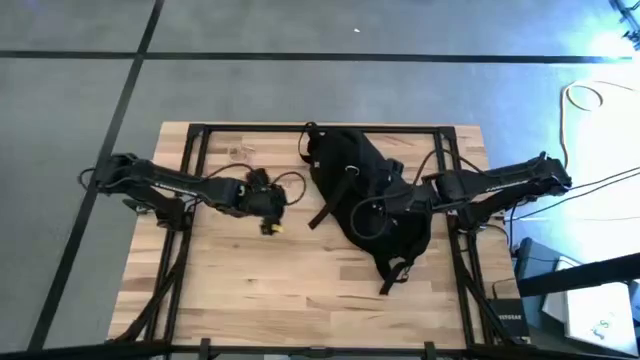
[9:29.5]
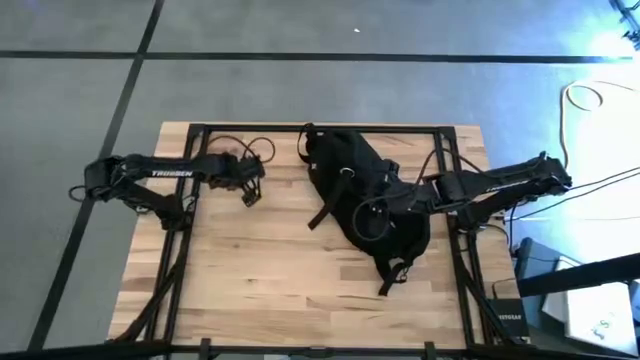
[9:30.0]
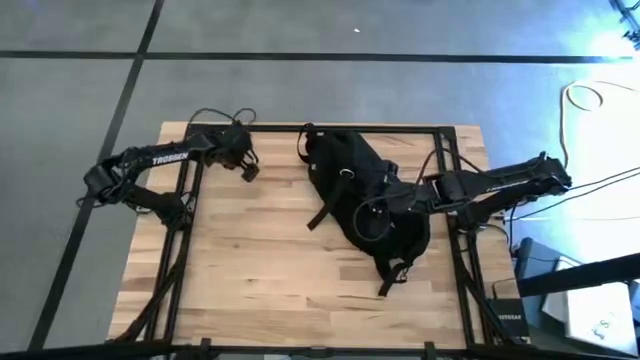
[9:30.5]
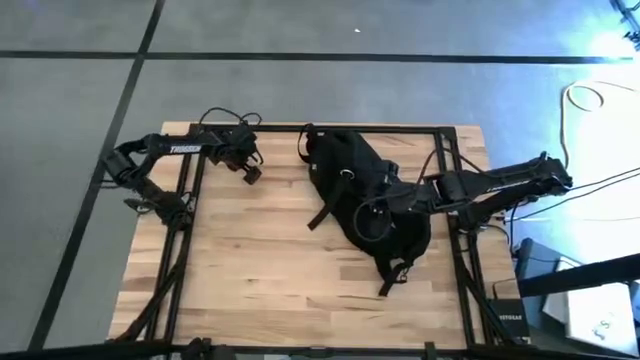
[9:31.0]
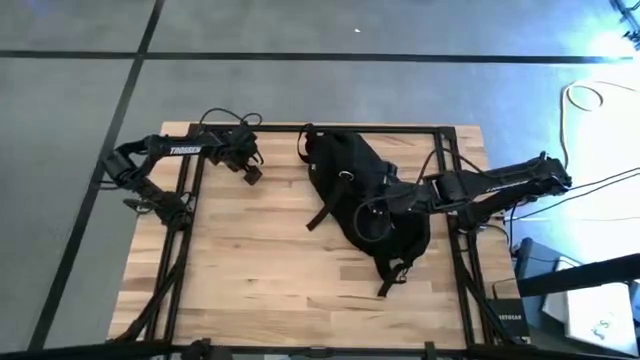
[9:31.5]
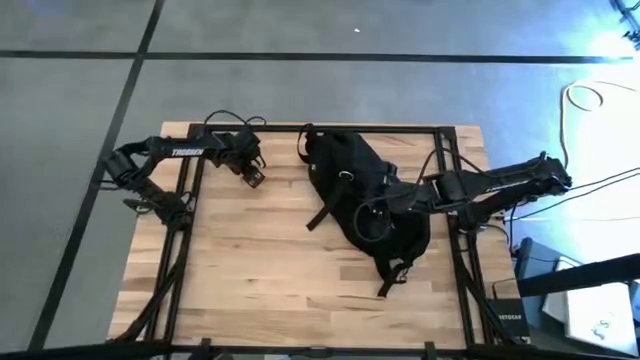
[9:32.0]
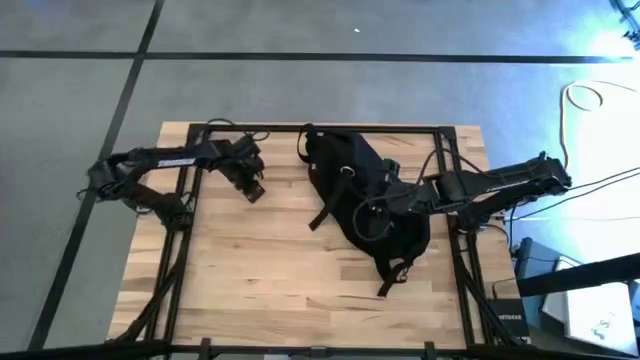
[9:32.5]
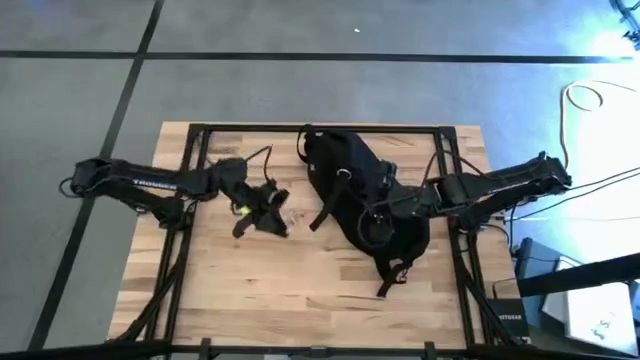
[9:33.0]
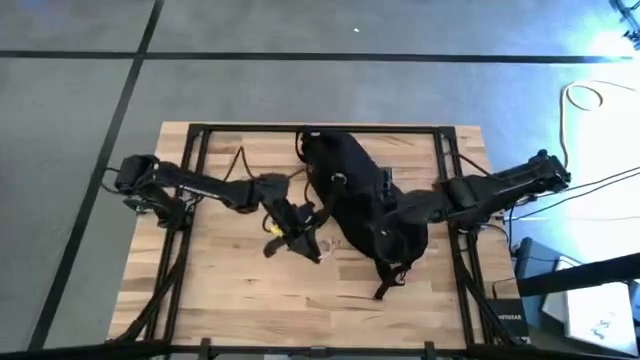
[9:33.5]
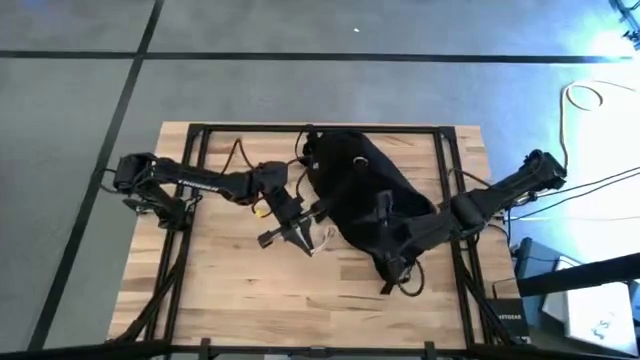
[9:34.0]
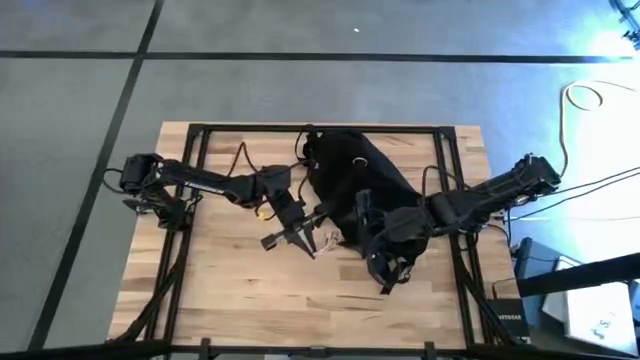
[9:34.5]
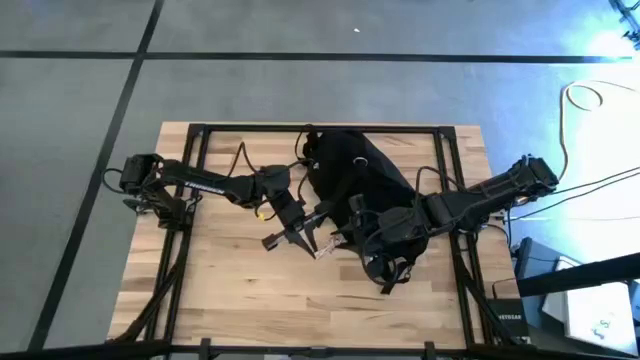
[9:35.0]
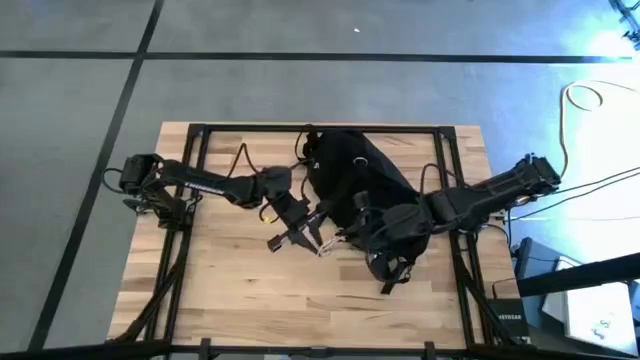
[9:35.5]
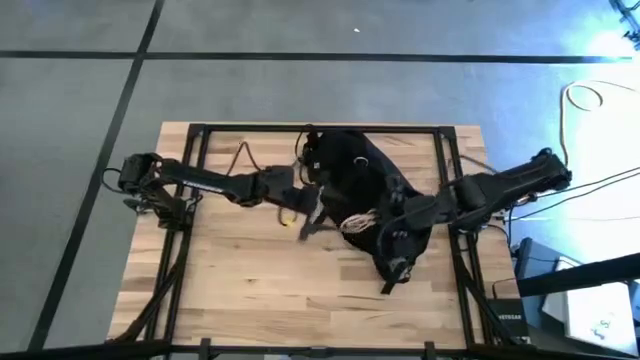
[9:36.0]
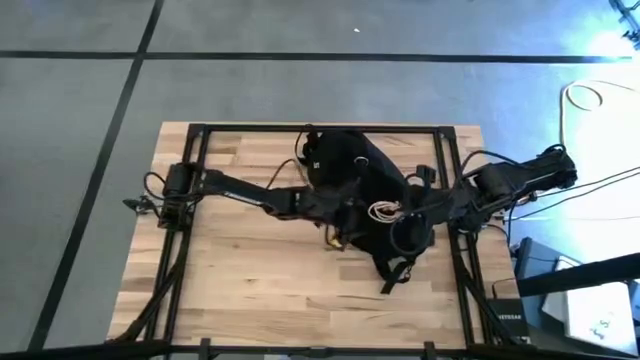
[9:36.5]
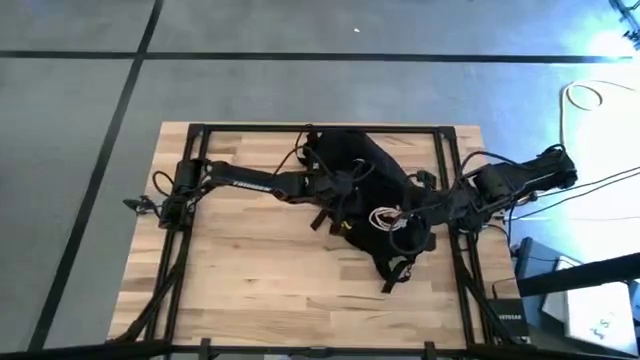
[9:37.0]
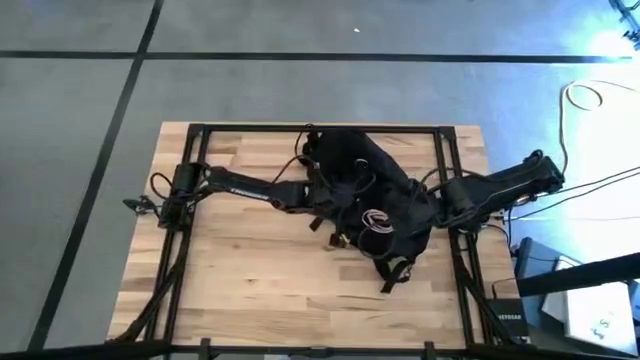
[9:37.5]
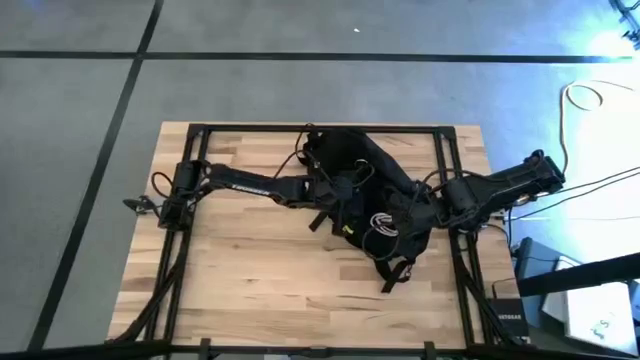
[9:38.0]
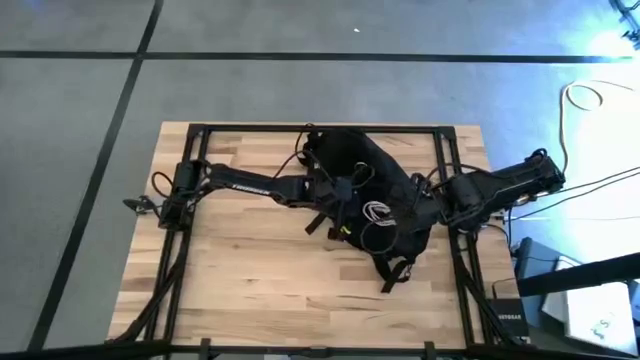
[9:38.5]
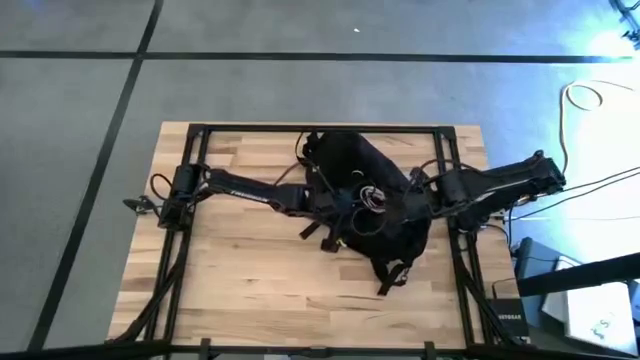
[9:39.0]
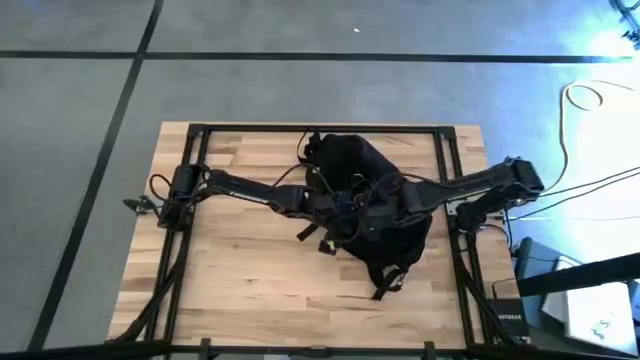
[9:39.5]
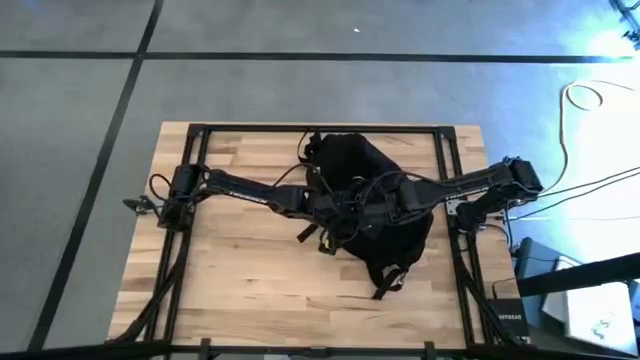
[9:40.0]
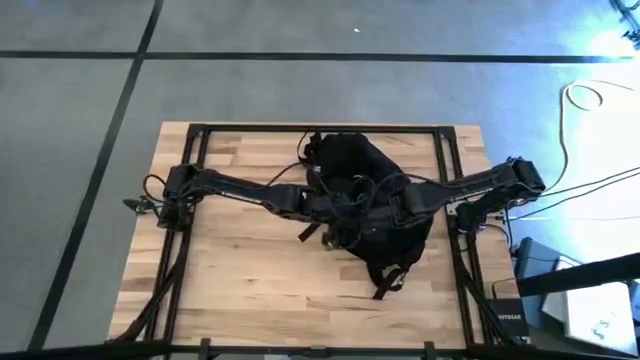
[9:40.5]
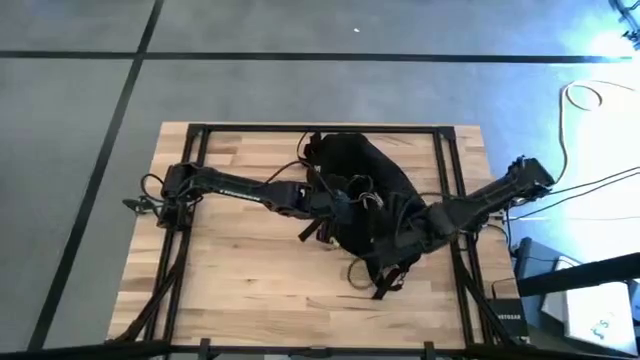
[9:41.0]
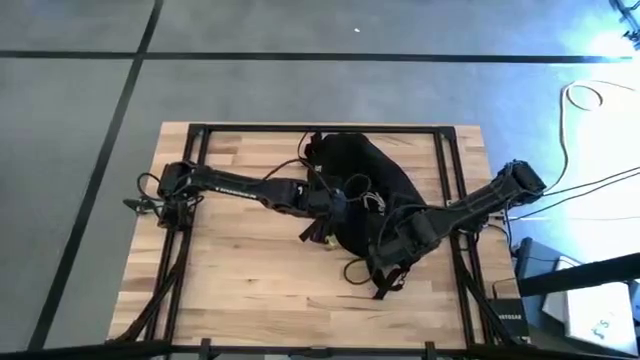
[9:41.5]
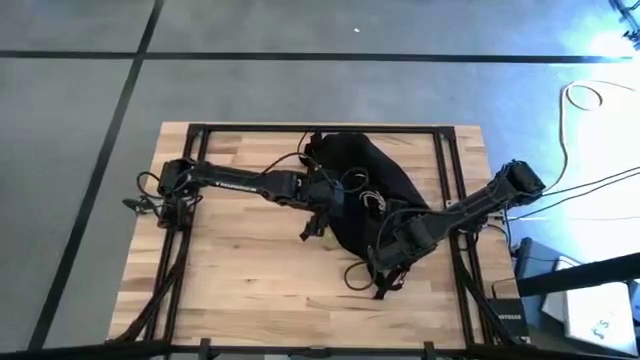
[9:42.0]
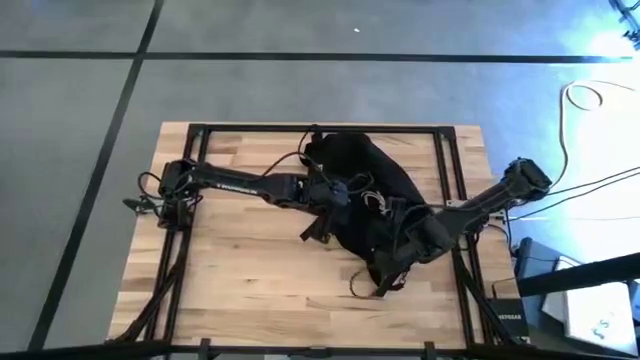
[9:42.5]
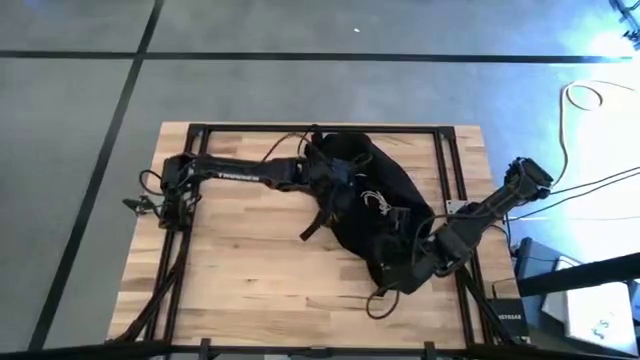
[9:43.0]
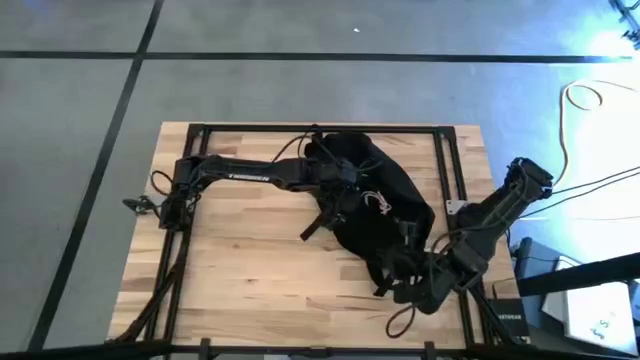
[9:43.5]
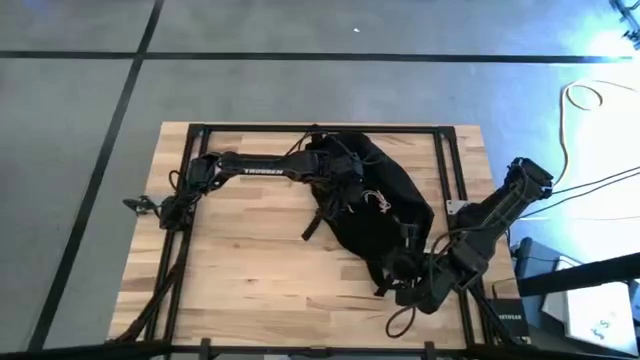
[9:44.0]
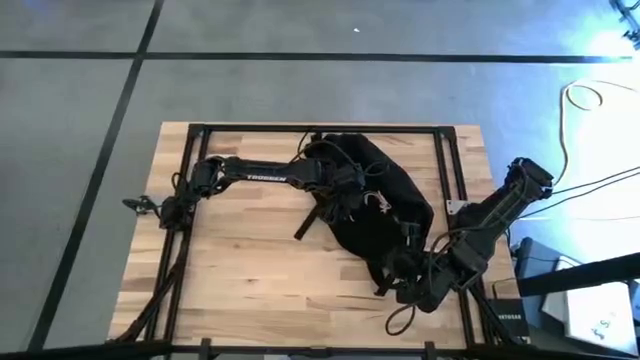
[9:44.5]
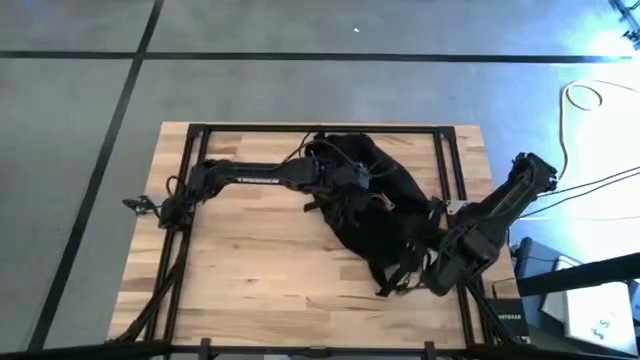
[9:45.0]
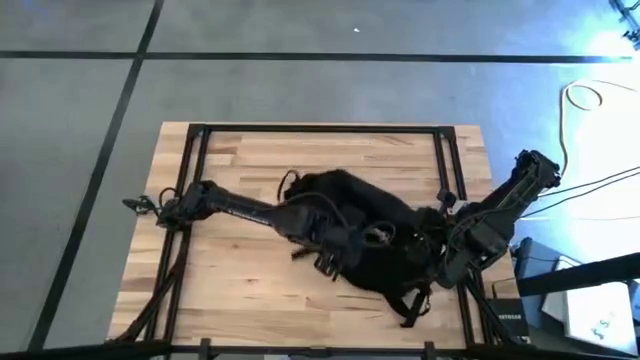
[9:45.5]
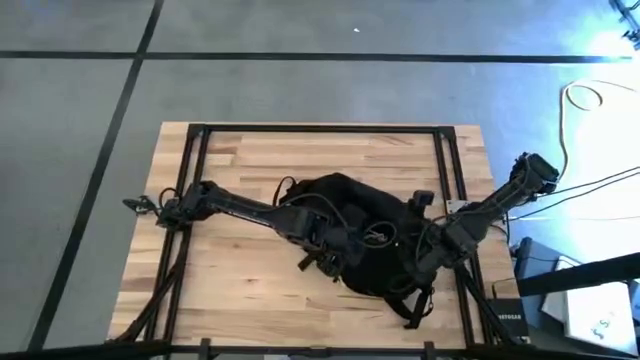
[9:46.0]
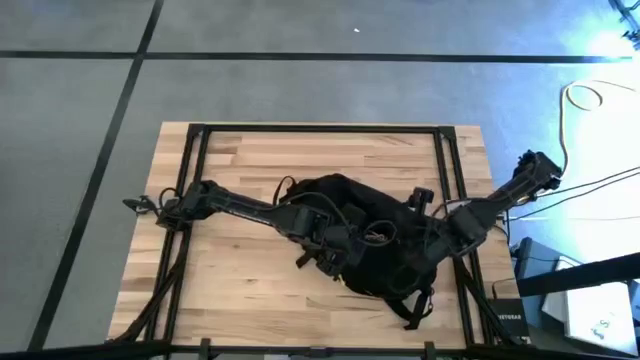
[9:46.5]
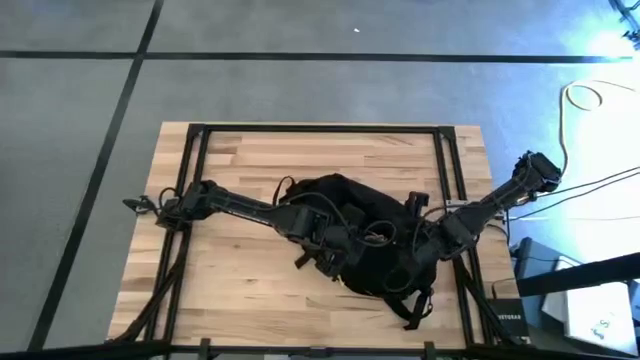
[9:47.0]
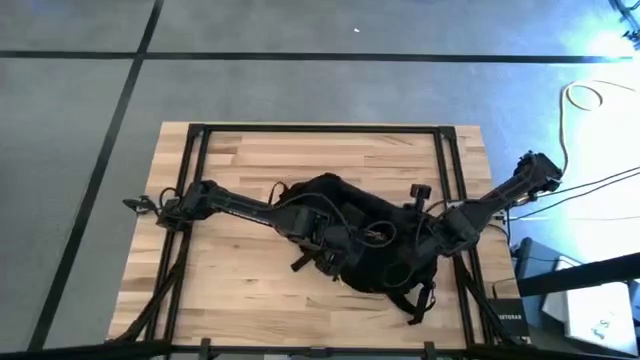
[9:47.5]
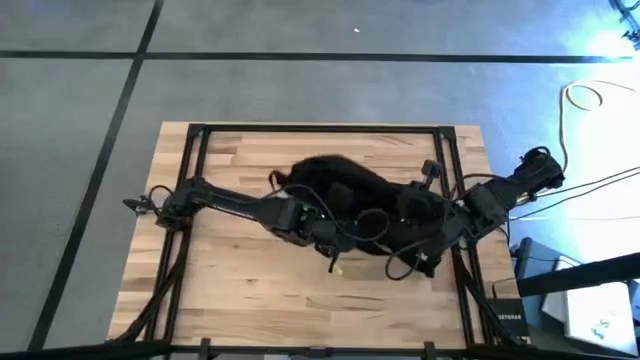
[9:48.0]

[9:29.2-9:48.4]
Task: Unpack backpack
Put the pink charger cable into the black backpack

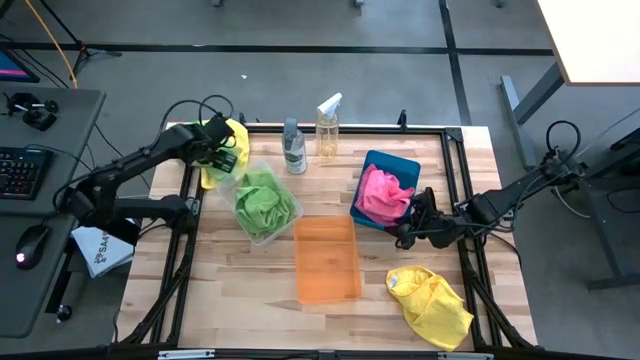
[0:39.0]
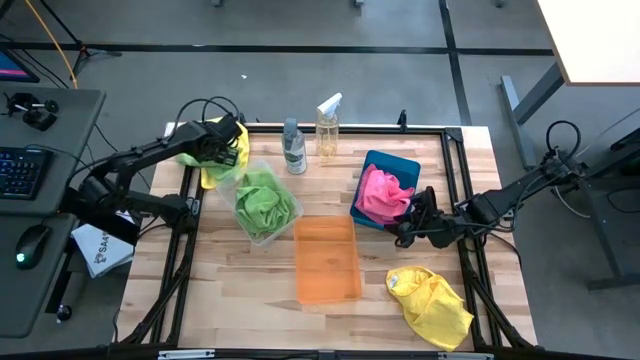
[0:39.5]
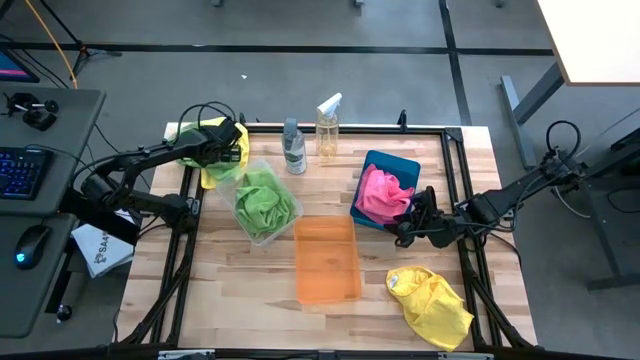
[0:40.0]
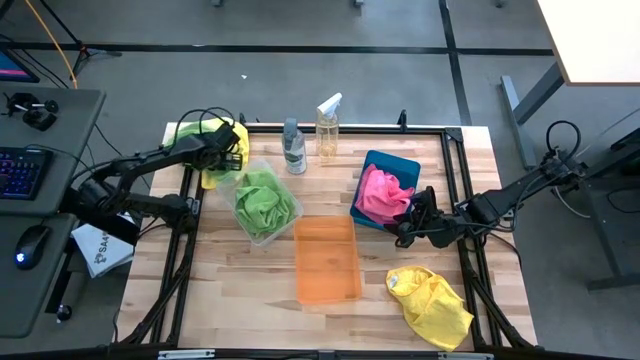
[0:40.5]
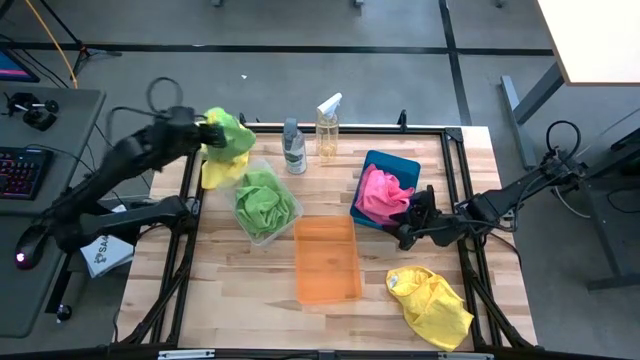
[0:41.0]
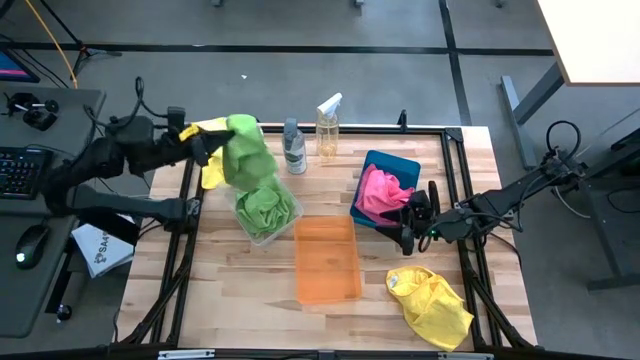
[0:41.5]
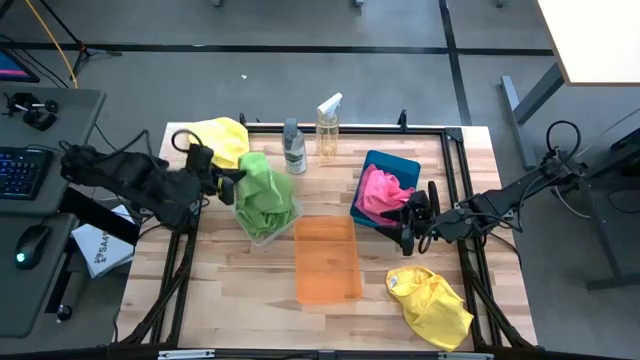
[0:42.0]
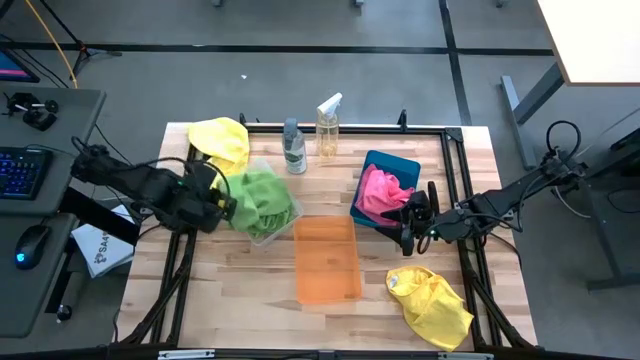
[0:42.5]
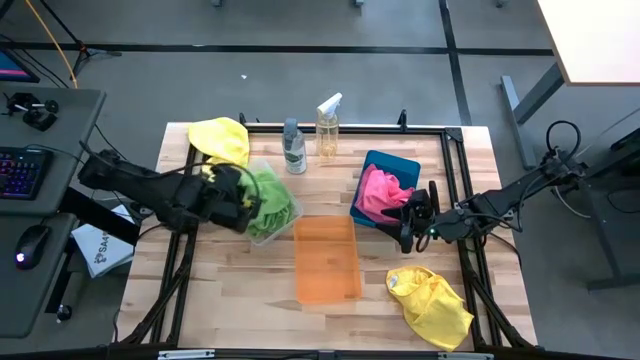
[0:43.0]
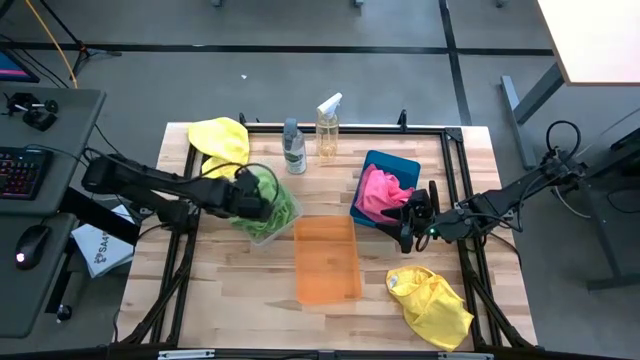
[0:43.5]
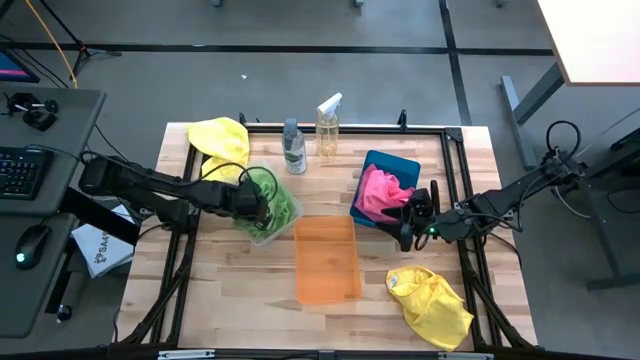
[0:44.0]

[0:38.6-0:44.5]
Task: Sort microfiber towel by color & place in baskets
Put the green microfiber towel into the transparent bin
